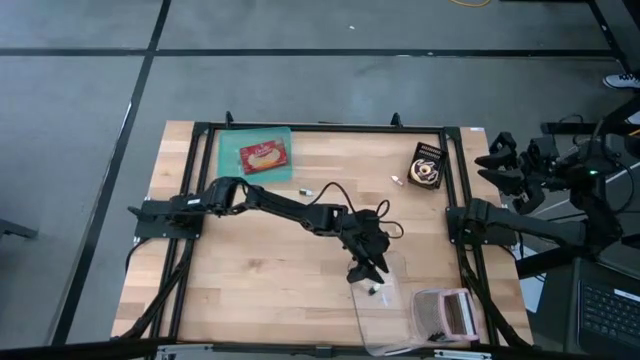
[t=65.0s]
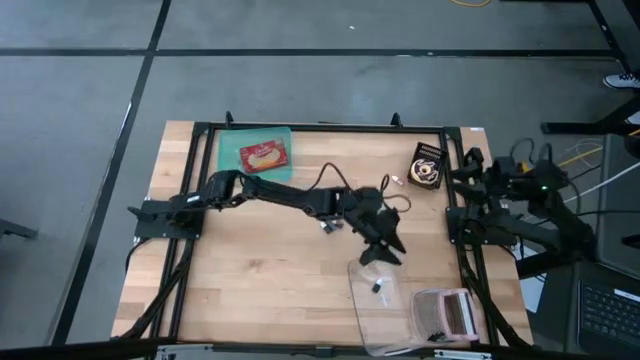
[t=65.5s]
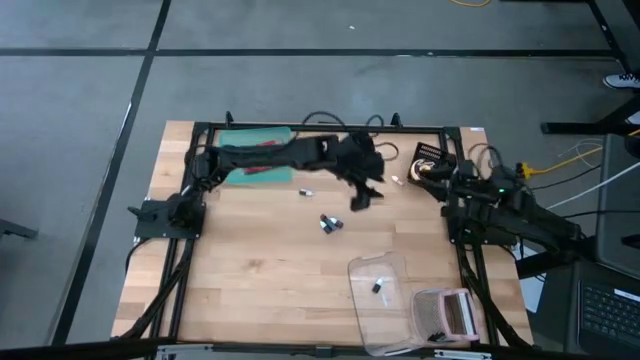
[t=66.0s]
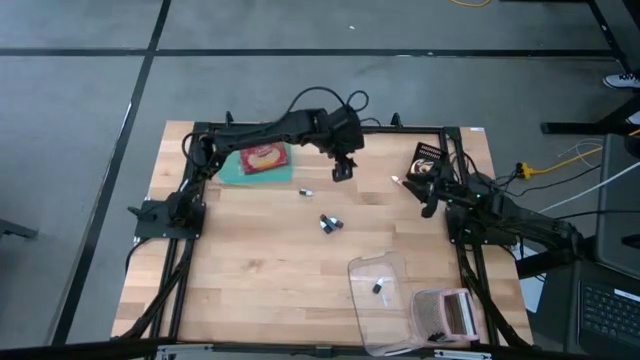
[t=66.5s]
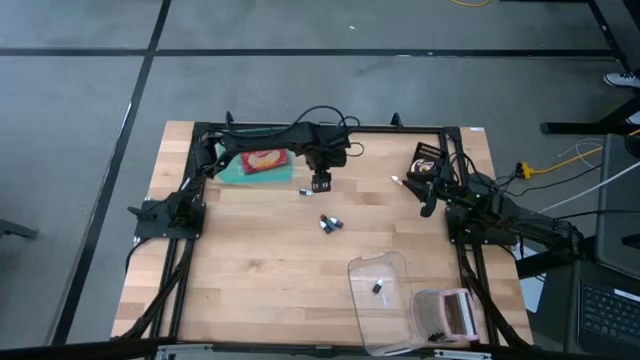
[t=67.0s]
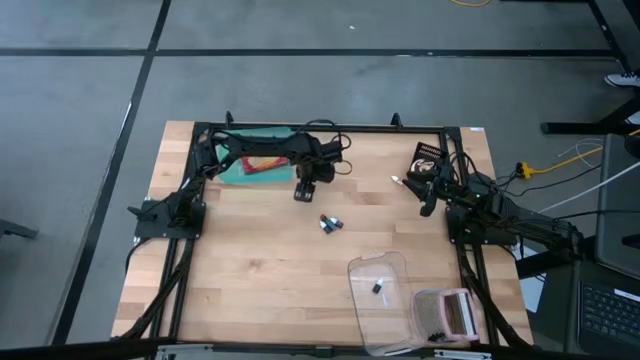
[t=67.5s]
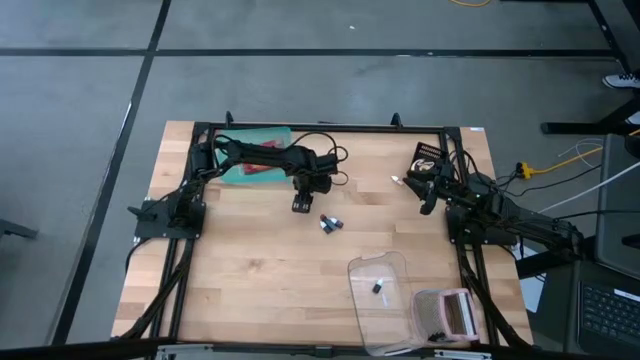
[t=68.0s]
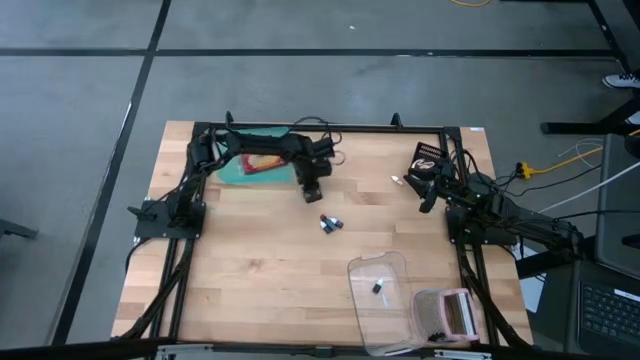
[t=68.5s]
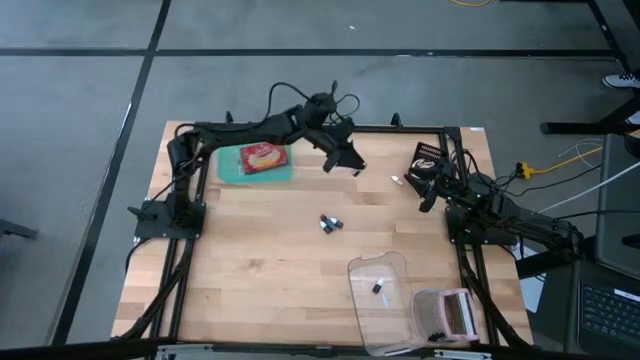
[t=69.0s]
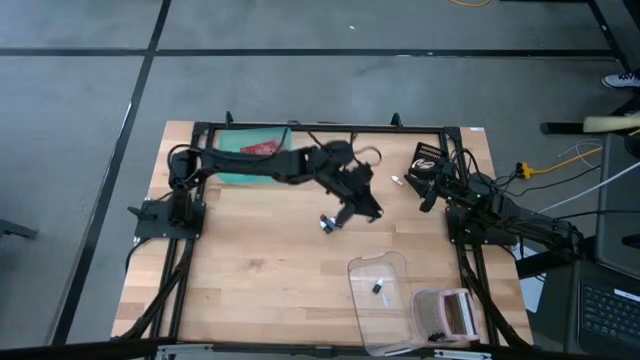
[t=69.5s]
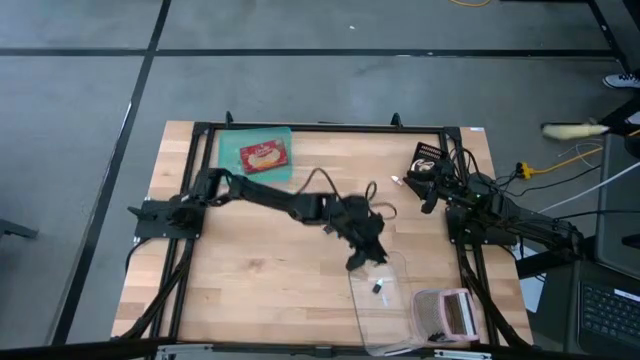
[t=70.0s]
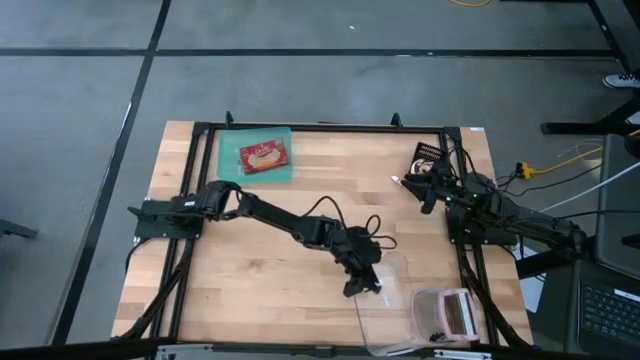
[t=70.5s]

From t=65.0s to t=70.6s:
Put the light blue food coloring bottle into the transparent bin

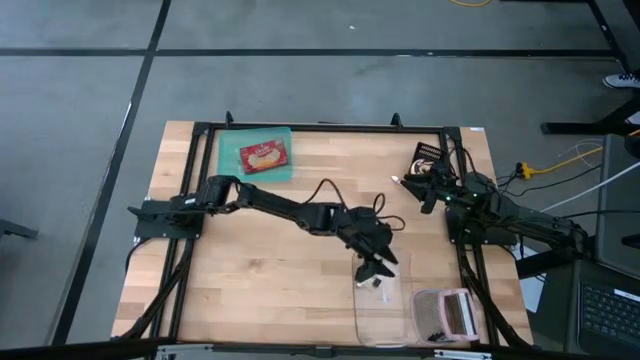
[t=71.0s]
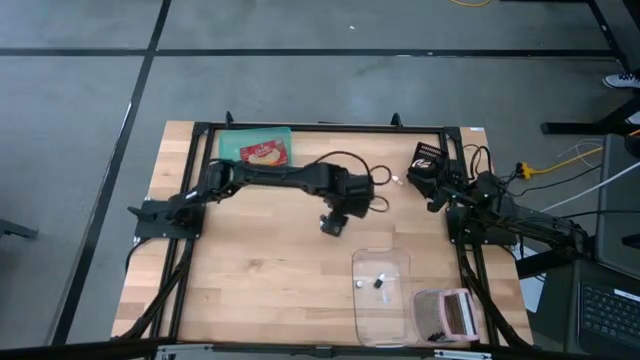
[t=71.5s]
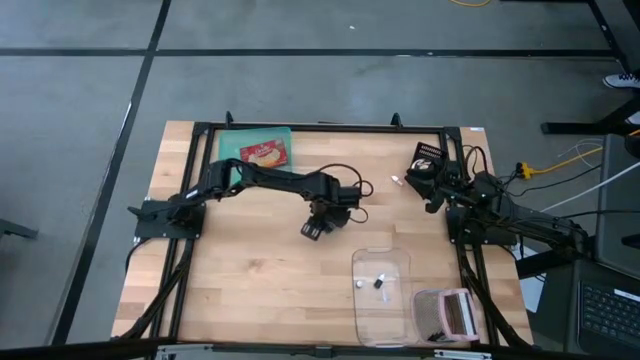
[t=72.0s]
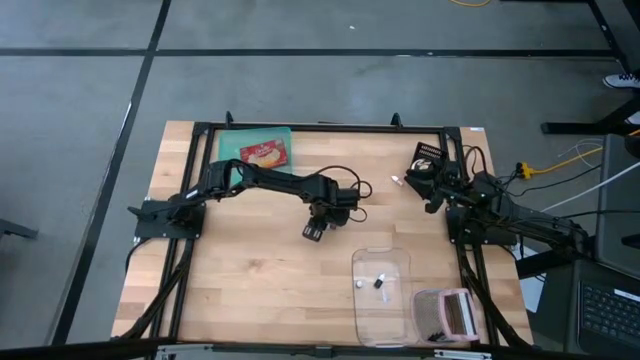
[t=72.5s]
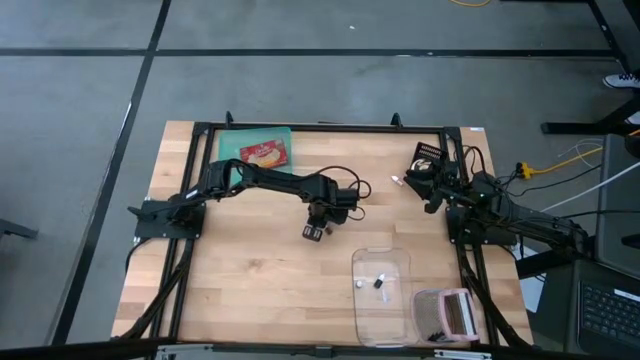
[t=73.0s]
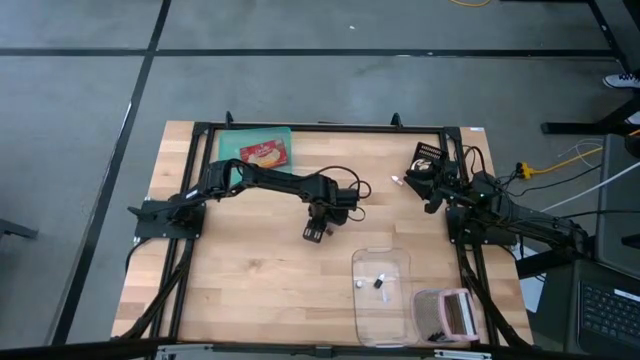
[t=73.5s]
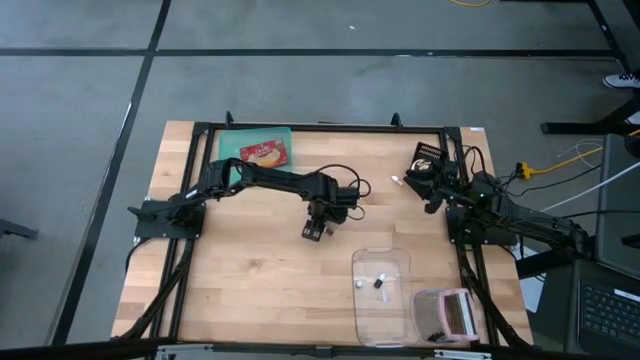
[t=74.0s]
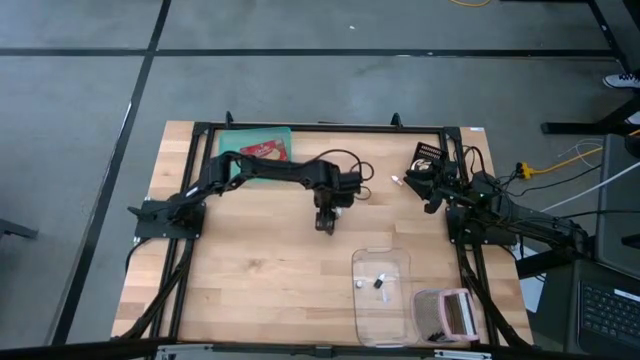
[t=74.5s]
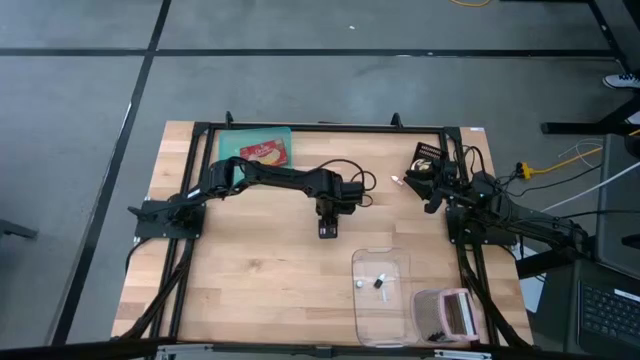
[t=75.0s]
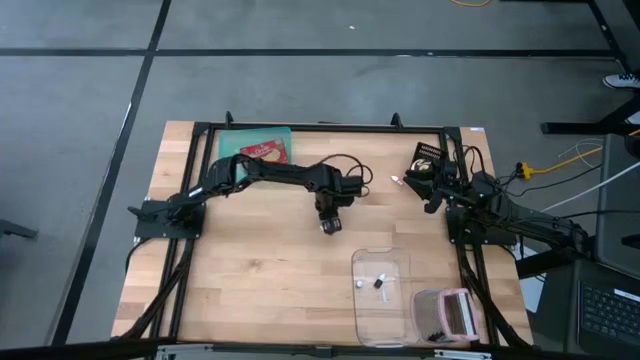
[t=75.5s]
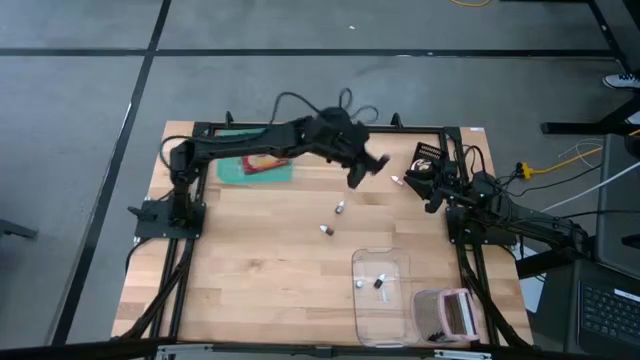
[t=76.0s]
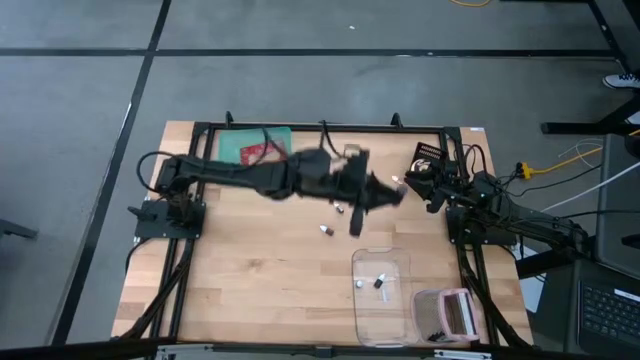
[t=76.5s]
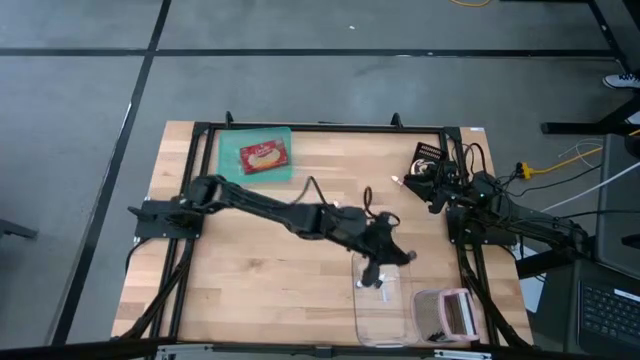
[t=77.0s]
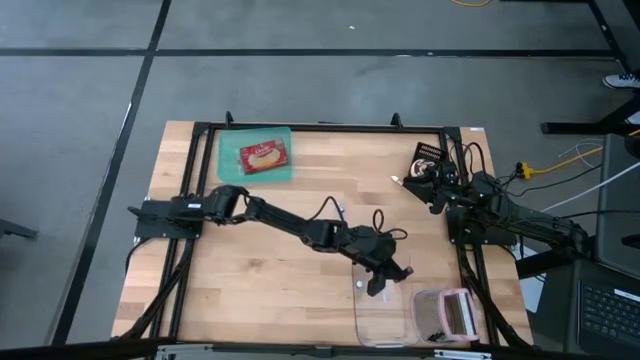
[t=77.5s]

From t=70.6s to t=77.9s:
Put the long red food coloring bottle into the transparent bin

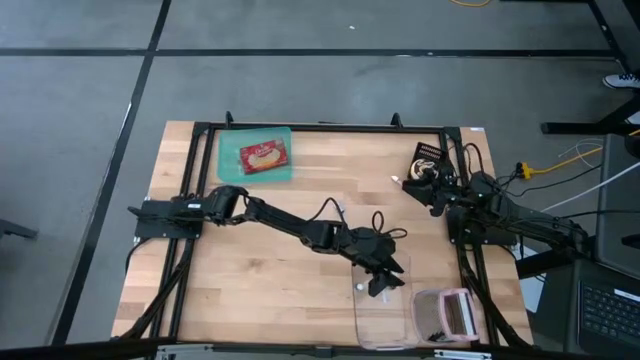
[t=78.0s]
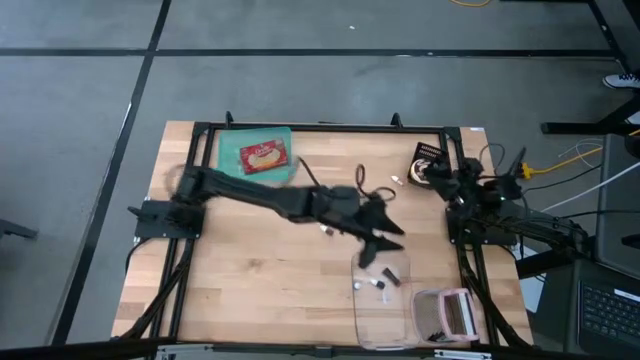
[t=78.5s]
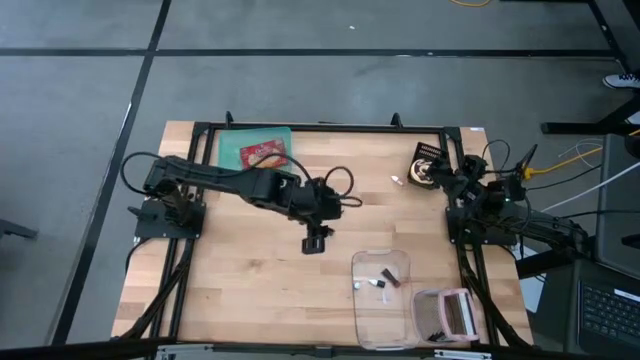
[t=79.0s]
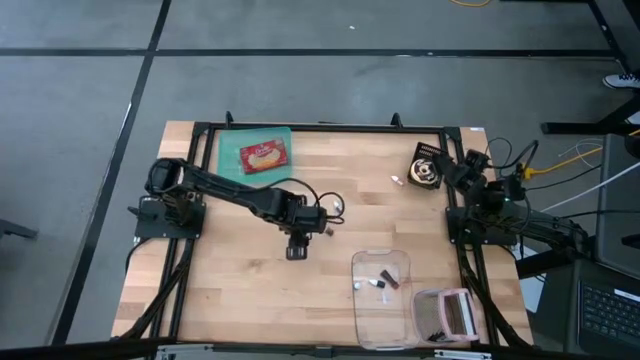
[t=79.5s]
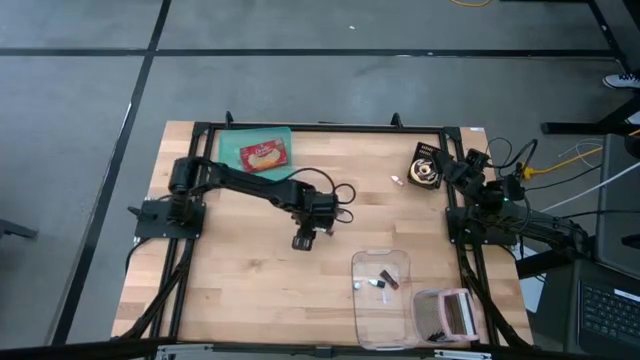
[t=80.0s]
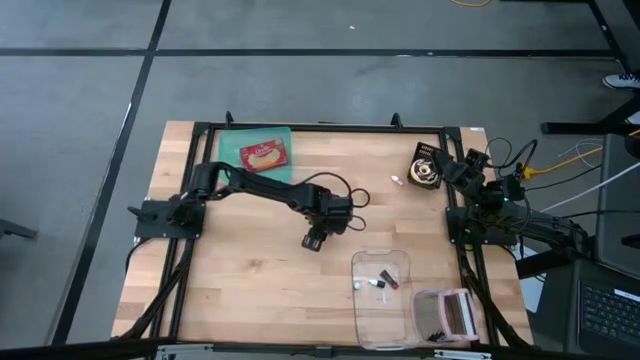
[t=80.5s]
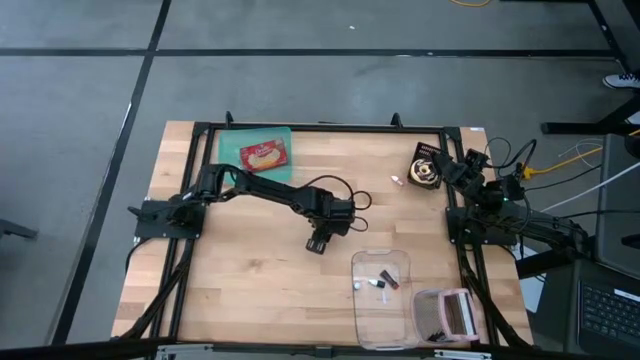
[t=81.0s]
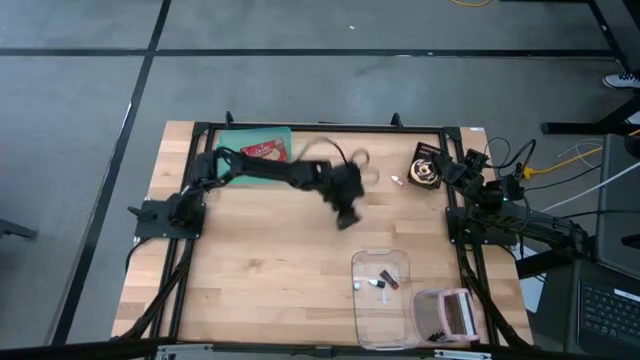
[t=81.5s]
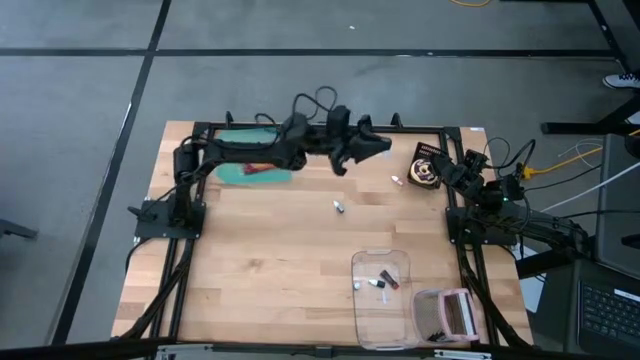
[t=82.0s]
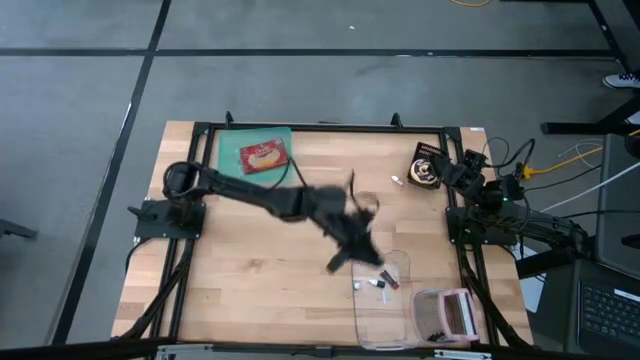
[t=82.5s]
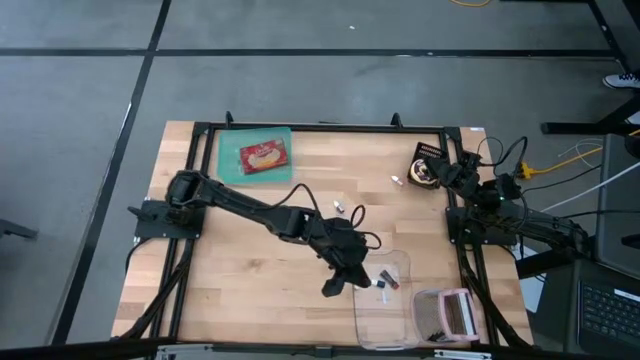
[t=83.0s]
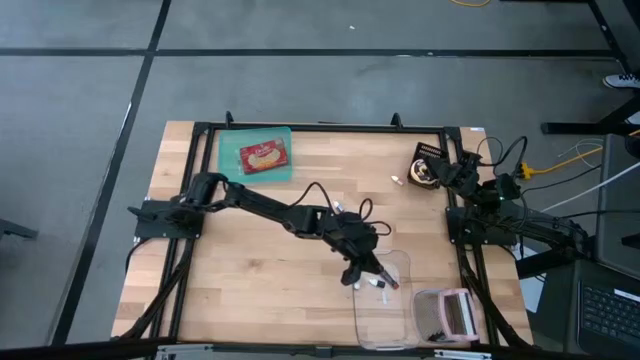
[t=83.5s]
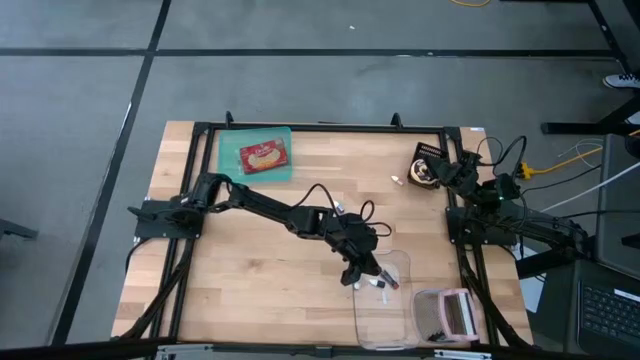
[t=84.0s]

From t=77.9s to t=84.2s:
Put the red food coloring bottle into the transparent bin
